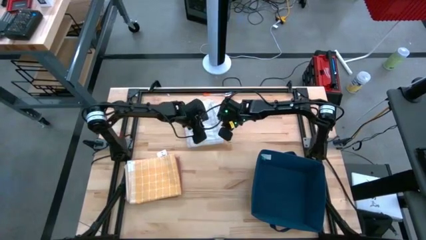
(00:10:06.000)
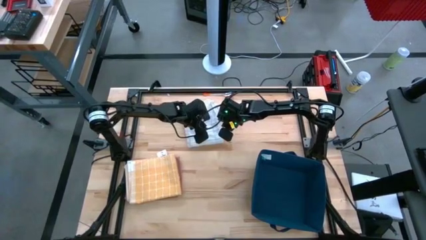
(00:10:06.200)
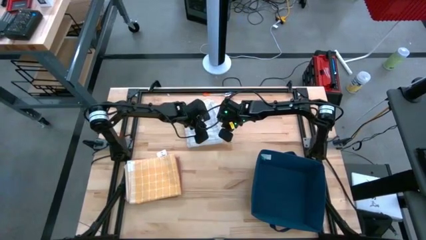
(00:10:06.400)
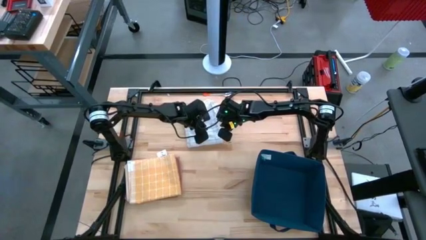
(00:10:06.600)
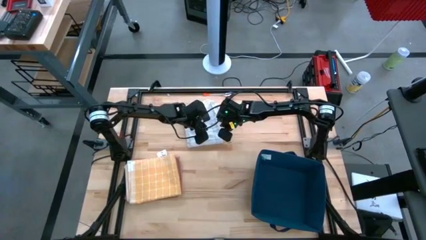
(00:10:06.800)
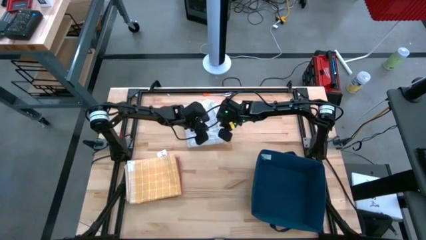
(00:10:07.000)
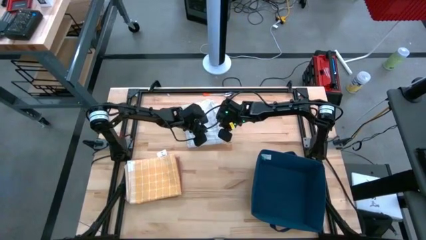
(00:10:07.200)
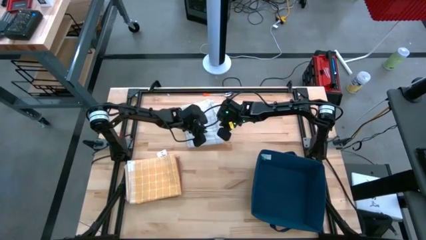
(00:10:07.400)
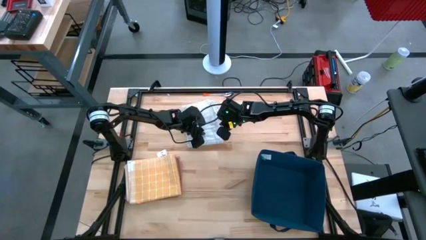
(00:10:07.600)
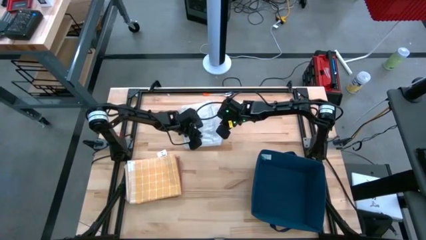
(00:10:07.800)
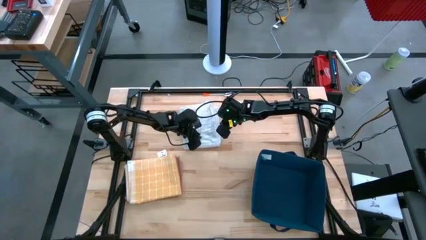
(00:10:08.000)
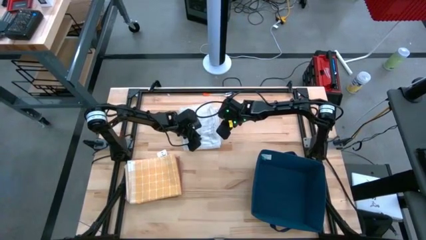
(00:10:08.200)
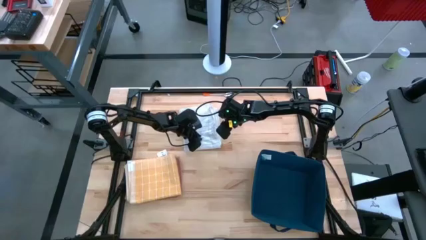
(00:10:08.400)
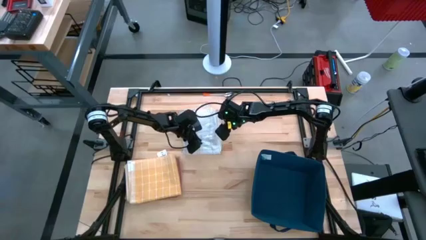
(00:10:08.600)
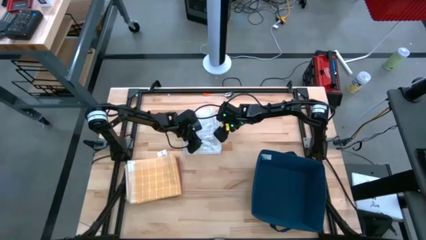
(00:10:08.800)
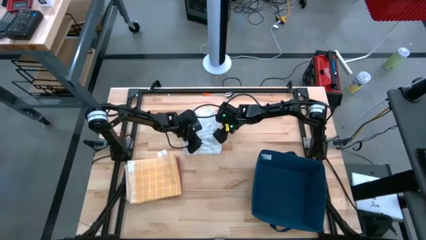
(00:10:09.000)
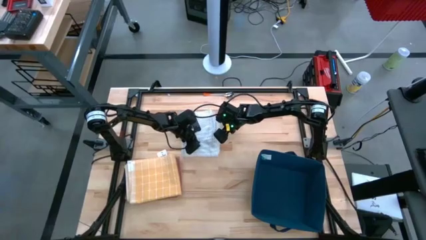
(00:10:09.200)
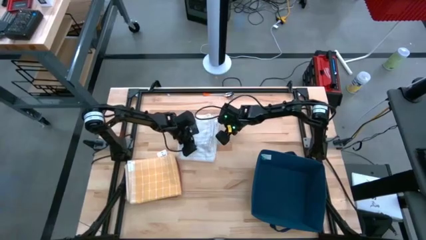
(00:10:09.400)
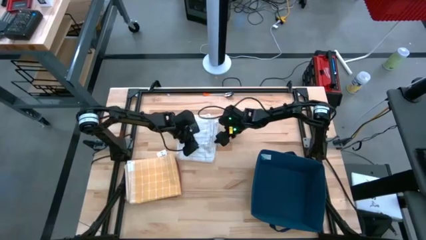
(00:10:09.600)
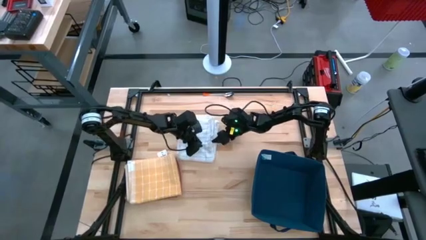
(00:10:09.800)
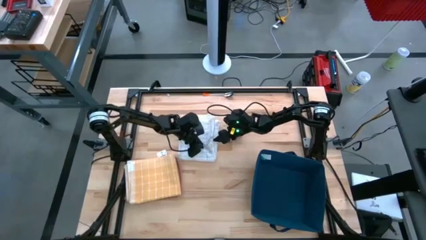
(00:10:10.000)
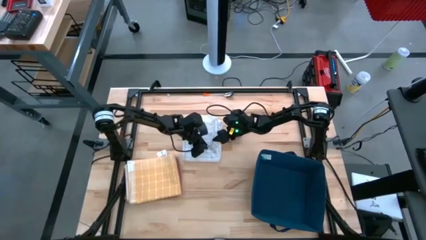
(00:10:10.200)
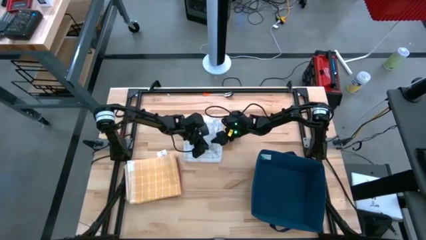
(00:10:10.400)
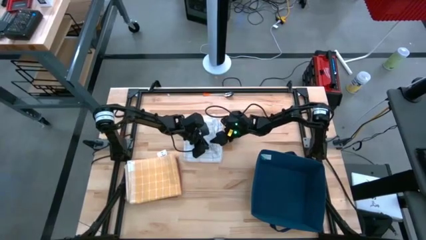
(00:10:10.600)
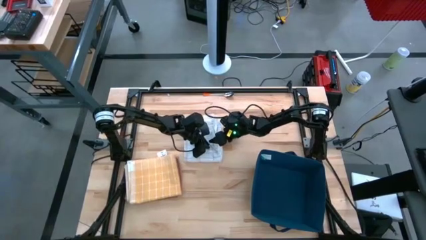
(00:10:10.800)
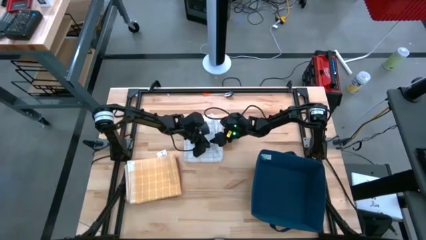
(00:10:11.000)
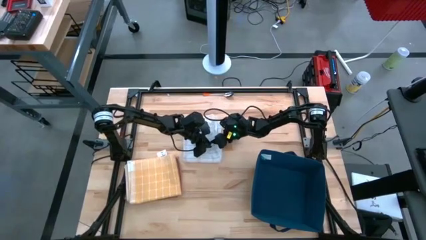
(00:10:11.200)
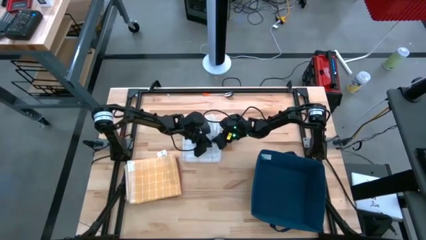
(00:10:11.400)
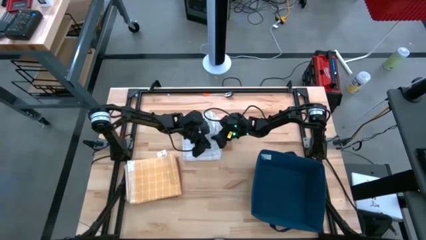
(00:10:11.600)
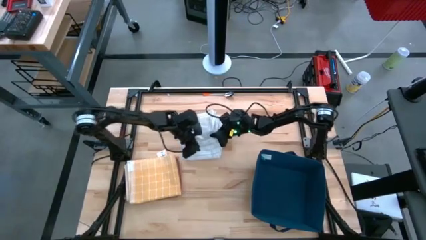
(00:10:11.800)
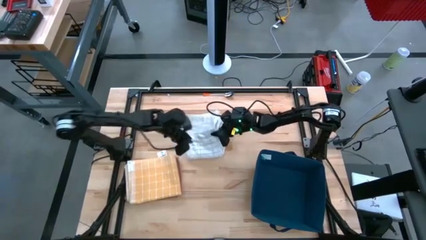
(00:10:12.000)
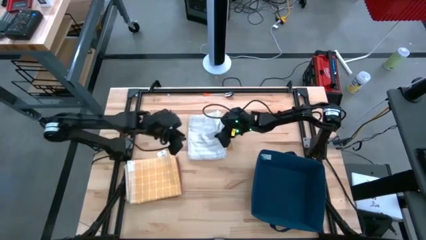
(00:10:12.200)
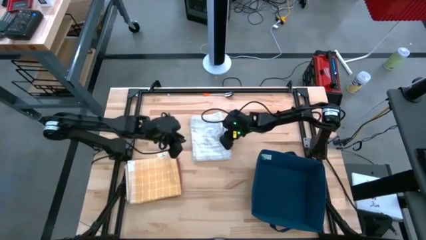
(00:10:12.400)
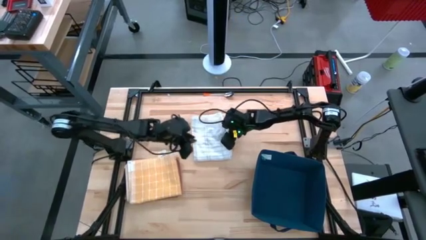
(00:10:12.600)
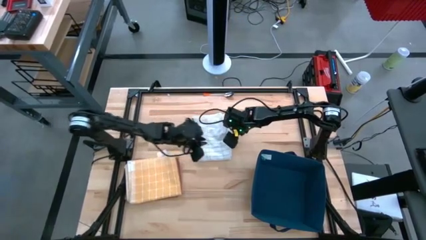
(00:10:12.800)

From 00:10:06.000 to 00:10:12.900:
Task: Fold towel
Stack the folded white towel on top of the folded yellow towel

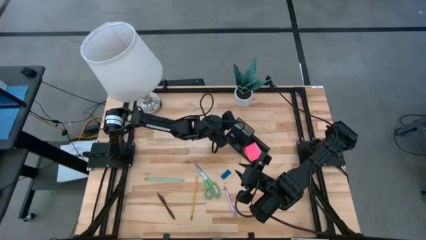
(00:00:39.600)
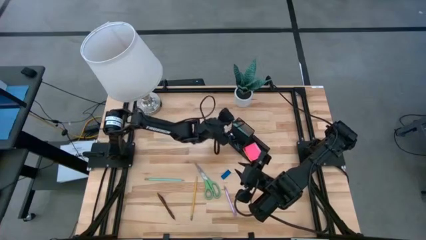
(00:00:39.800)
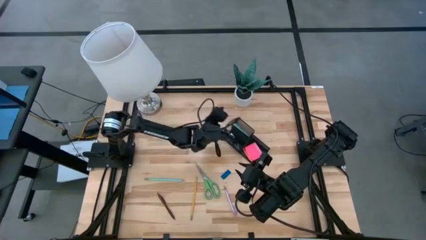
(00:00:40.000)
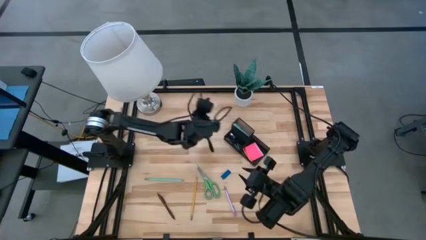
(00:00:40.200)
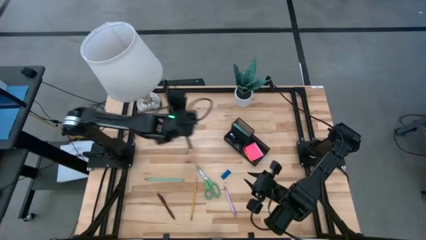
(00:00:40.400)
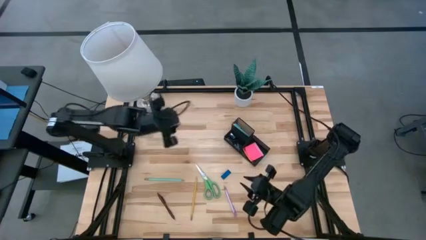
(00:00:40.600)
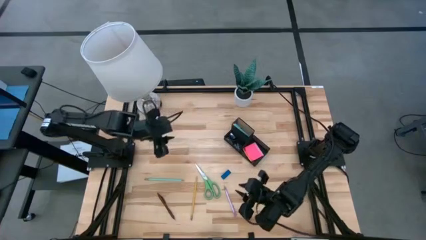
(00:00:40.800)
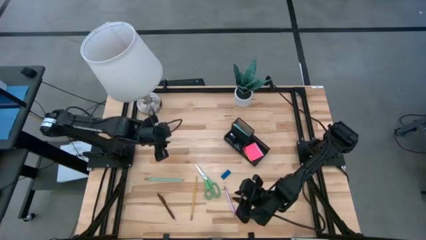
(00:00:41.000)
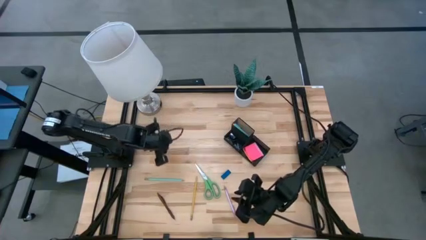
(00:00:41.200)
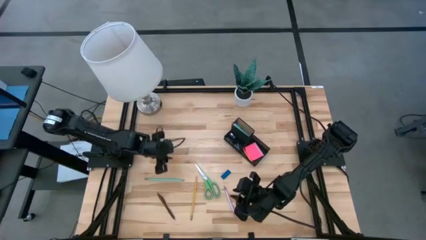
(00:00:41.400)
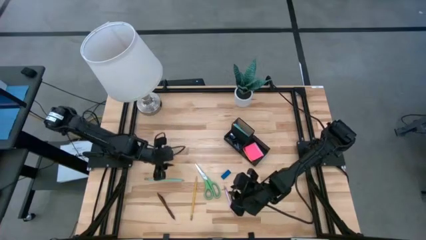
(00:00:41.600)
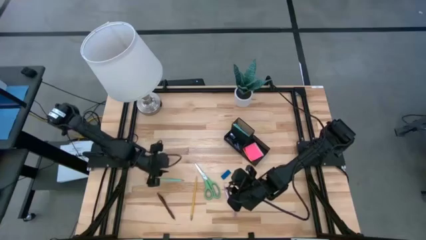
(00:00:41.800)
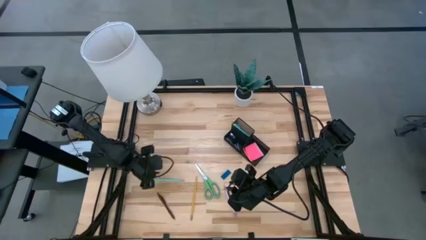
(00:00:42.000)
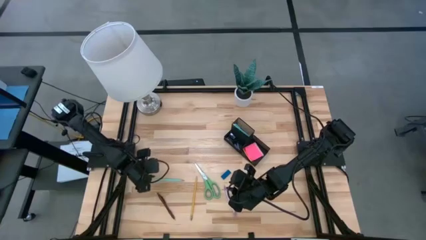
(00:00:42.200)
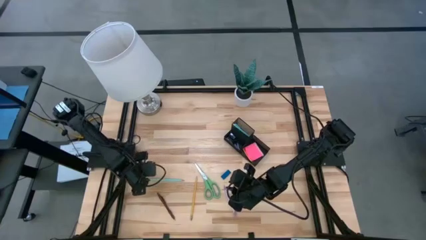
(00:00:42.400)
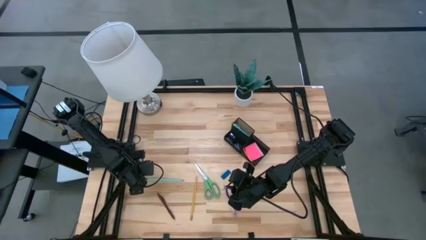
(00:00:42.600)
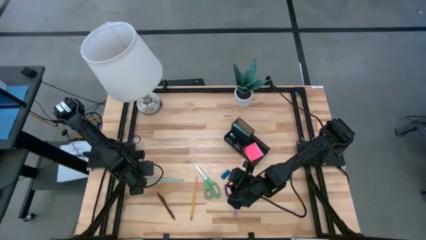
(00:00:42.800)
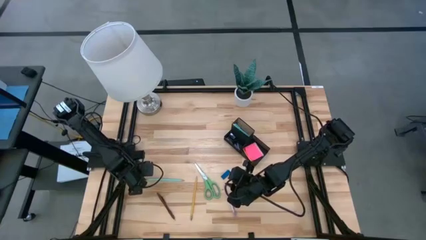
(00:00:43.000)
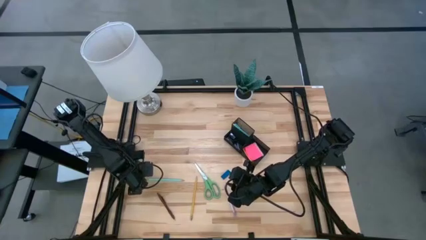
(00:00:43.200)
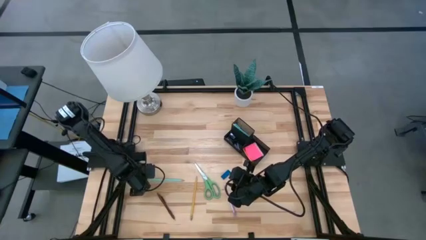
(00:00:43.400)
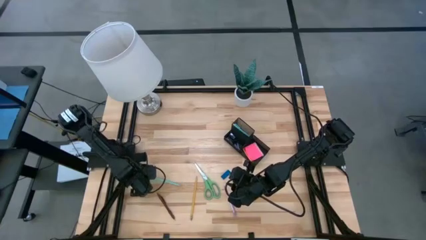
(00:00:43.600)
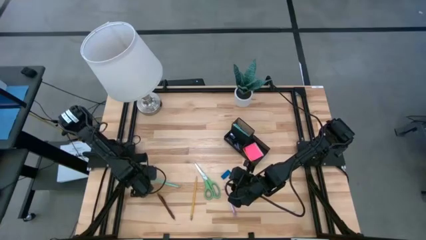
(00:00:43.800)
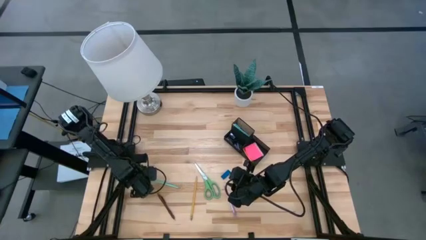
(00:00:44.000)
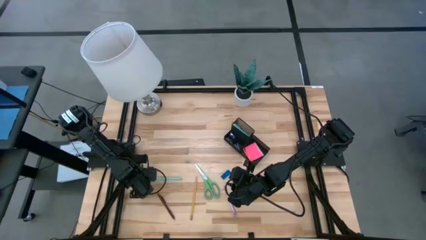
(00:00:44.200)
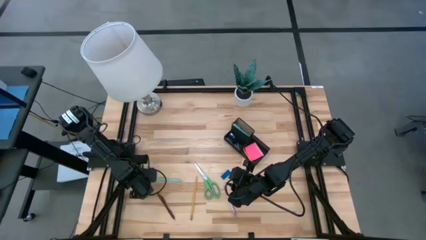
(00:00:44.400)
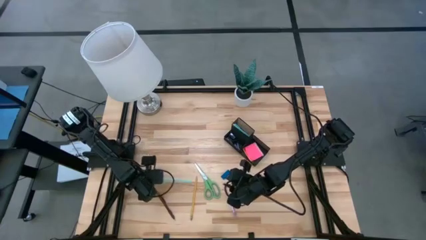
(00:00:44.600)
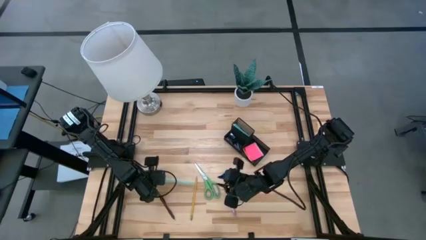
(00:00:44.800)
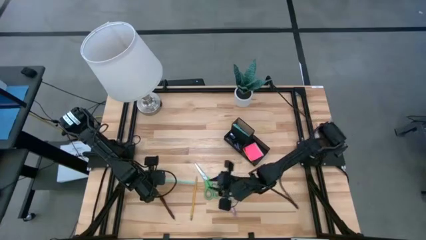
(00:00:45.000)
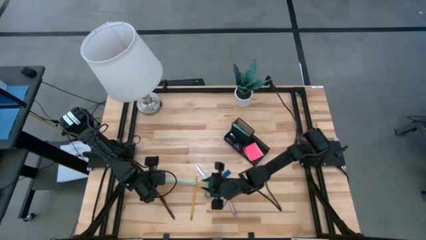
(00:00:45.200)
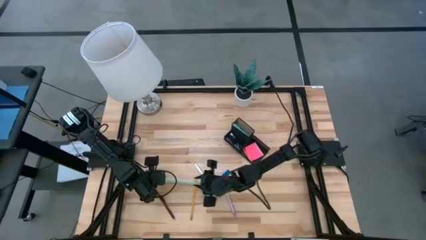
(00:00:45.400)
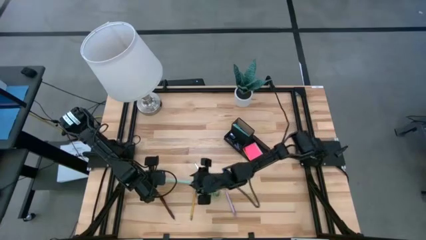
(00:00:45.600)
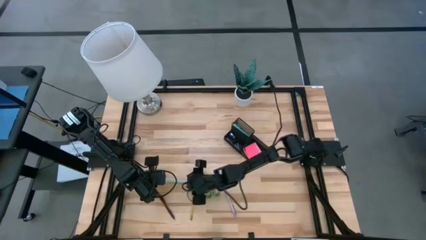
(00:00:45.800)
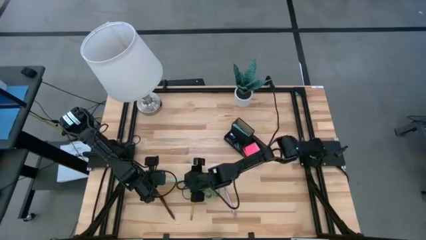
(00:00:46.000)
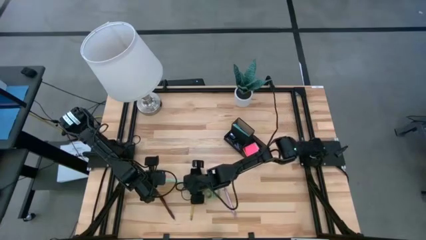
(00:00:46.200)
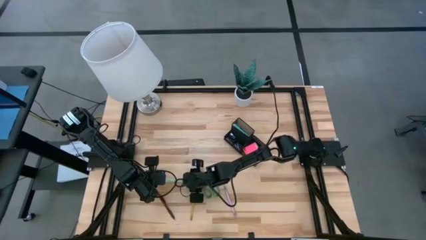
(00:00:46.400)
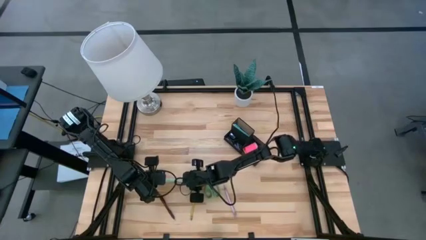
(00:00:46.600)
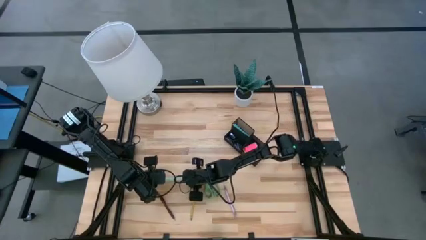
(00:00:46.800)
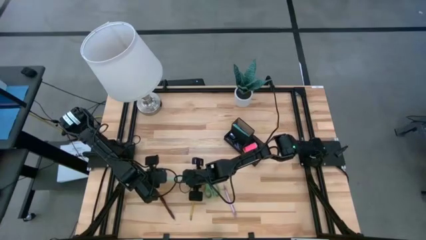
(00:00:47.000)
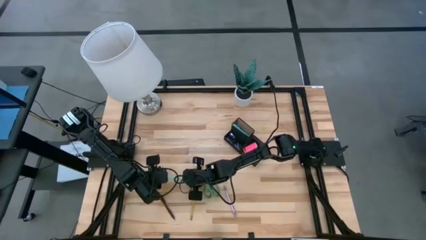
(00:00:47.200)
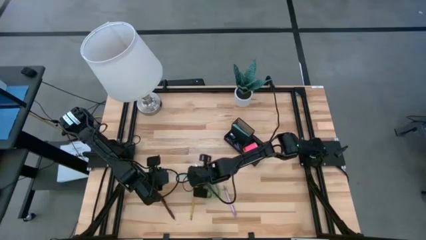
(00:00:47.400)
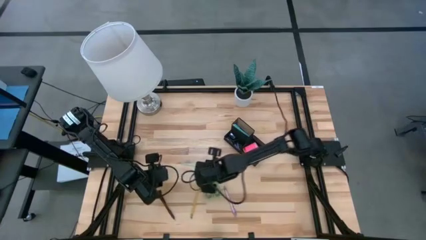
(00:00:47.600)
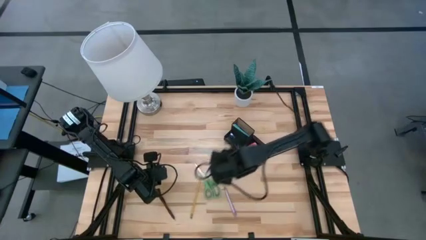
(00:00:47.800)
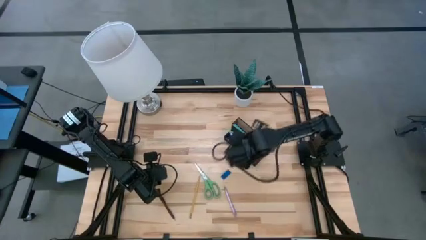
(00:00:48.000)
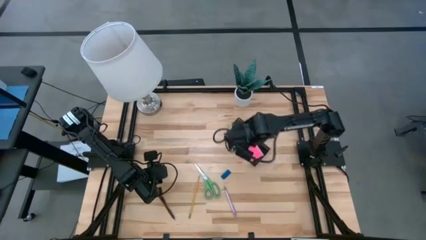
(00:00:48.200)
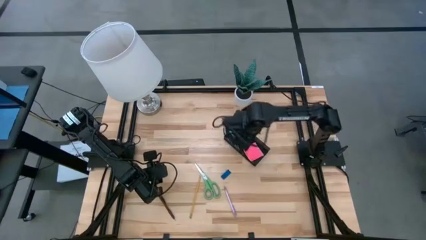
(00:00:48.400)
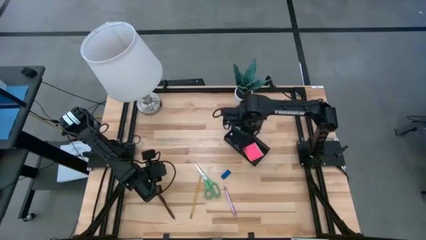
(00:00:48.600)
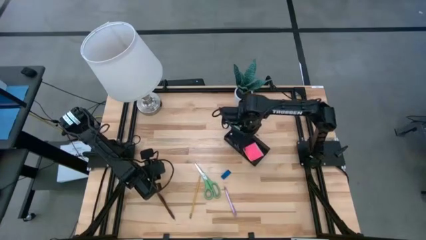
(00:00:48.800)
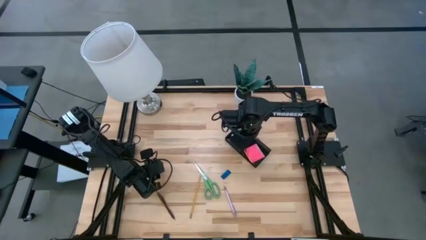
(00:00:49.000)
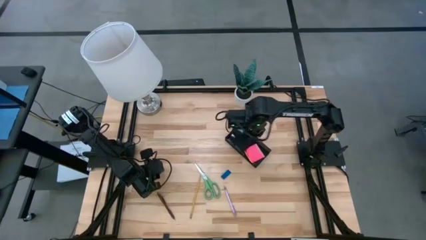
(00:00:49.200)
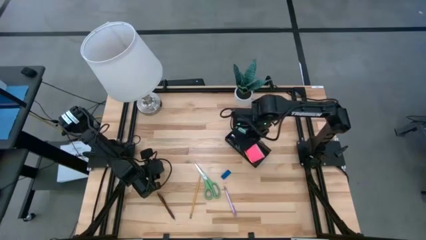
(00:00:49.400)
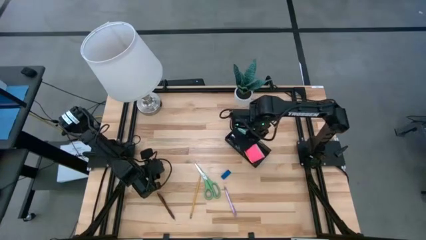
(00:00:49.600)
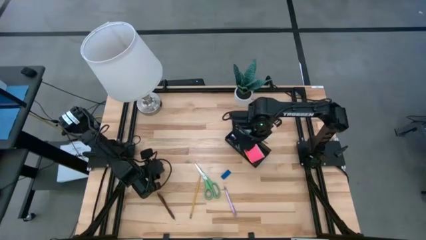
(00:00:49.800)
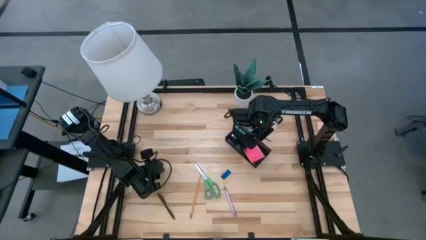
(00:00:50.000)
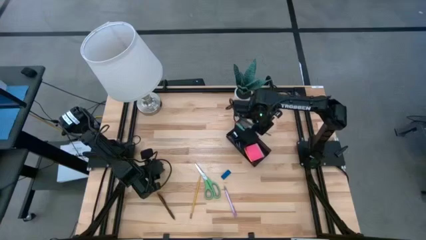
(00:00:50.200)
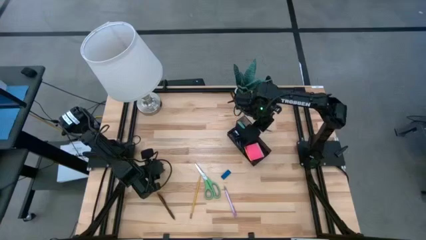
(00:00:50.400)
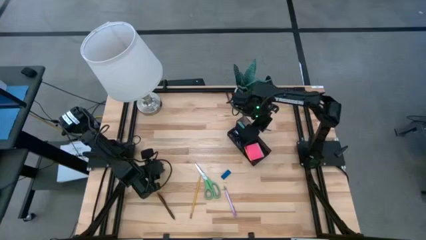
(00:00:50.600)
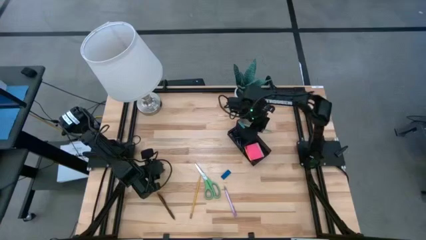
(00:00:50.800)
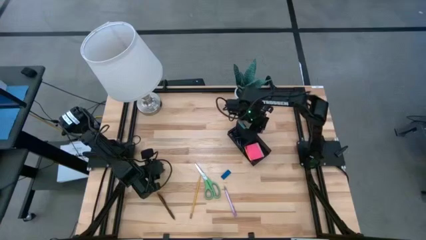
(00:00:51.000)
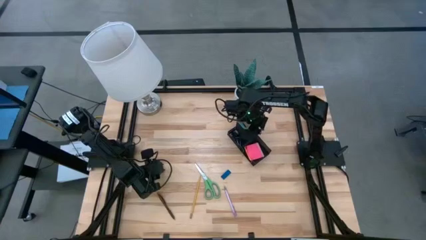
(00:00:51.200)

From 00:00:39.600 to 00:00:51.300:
Task: Pick and place office supplies into organizer
Put the blue pencil into the desk organizer
